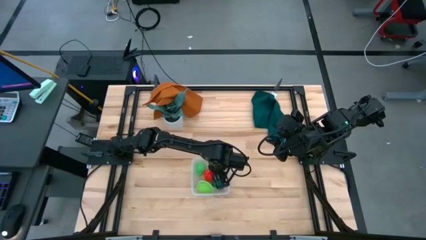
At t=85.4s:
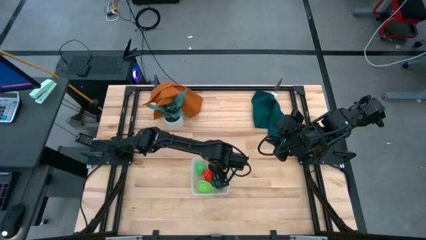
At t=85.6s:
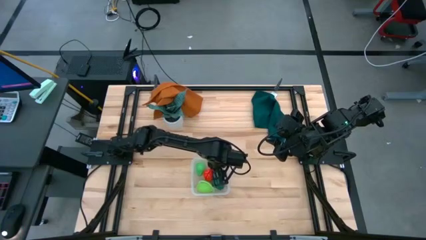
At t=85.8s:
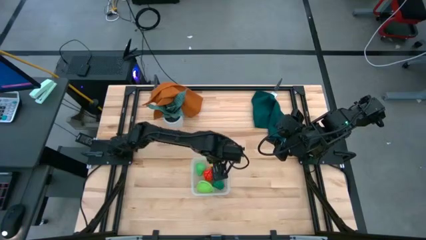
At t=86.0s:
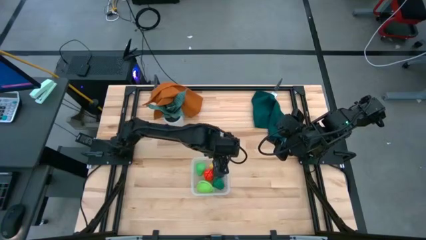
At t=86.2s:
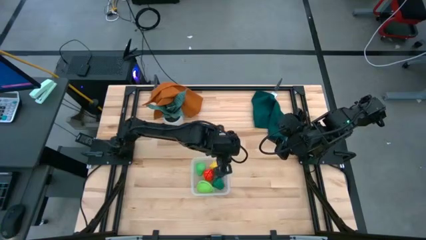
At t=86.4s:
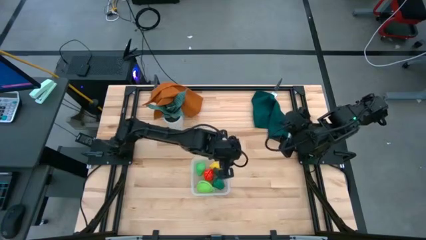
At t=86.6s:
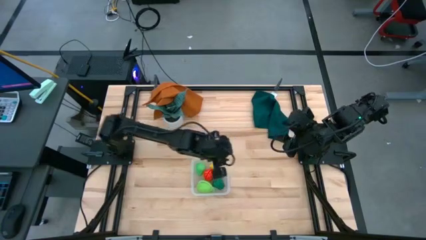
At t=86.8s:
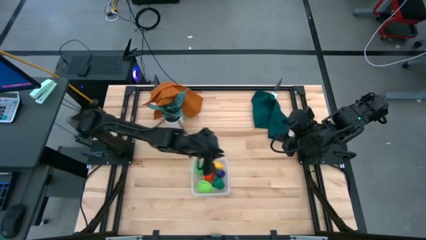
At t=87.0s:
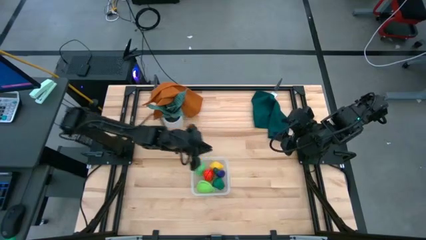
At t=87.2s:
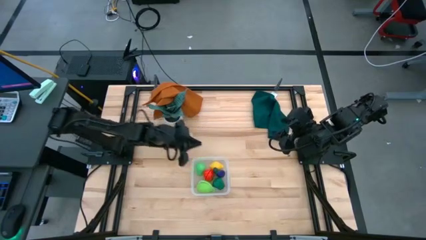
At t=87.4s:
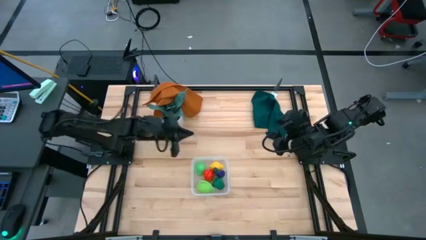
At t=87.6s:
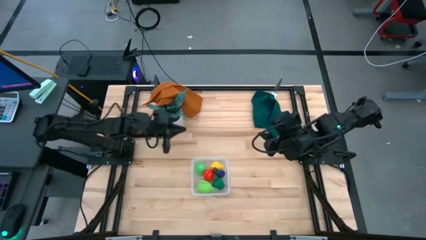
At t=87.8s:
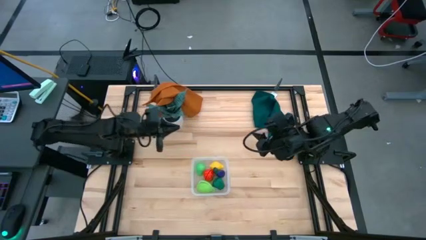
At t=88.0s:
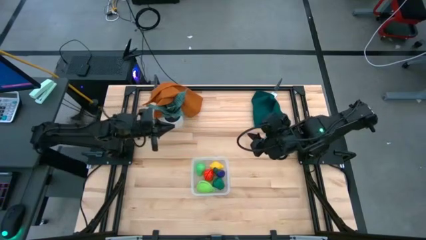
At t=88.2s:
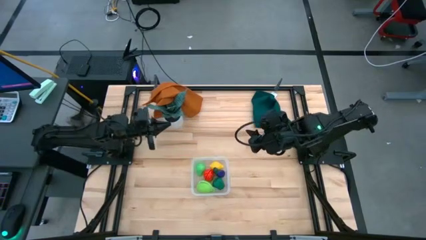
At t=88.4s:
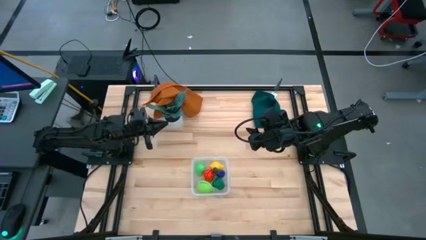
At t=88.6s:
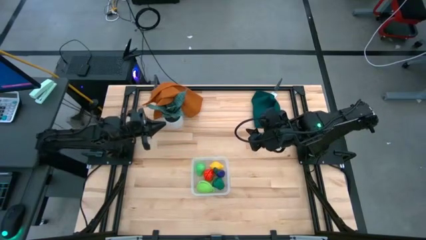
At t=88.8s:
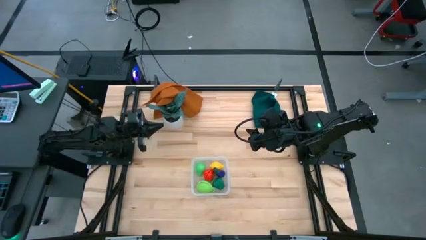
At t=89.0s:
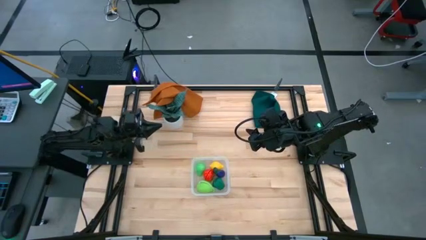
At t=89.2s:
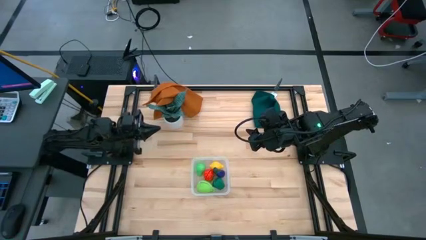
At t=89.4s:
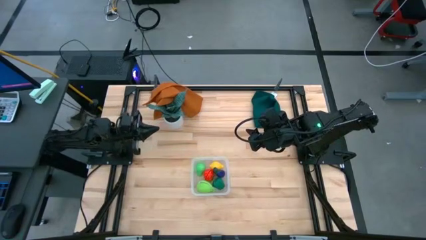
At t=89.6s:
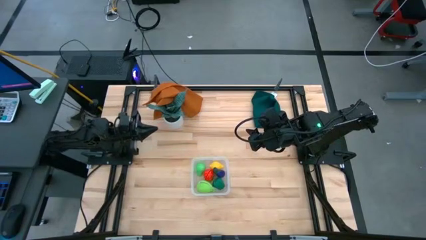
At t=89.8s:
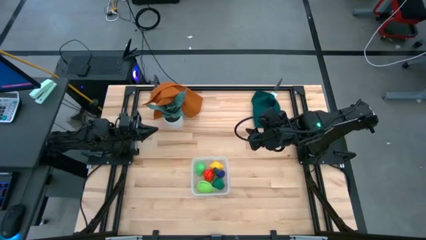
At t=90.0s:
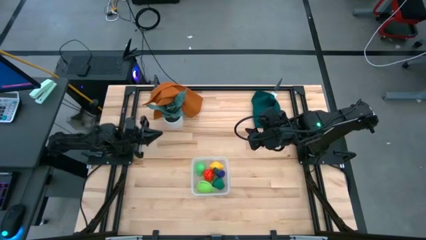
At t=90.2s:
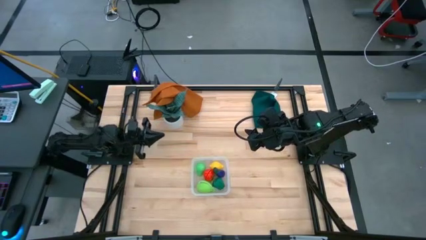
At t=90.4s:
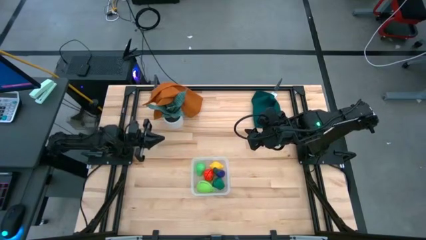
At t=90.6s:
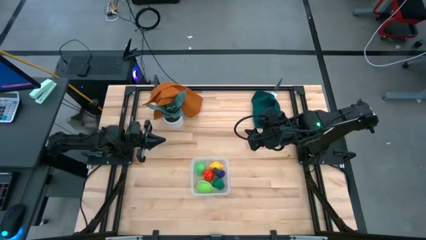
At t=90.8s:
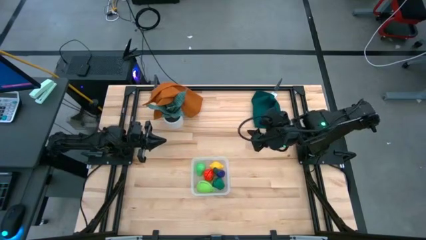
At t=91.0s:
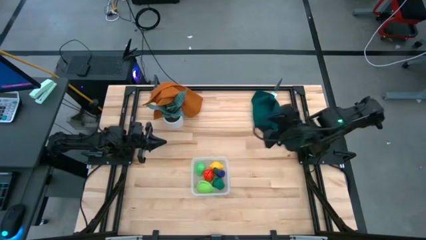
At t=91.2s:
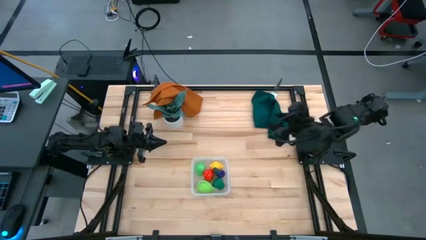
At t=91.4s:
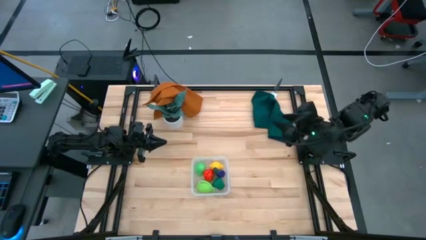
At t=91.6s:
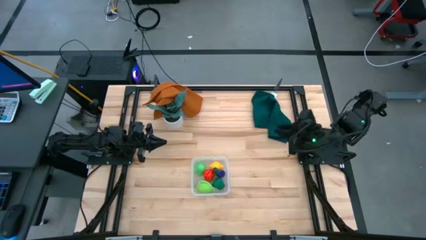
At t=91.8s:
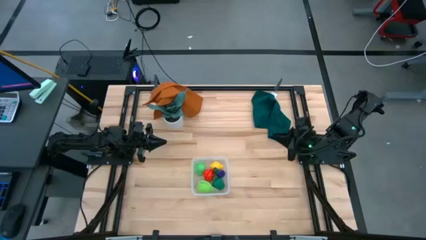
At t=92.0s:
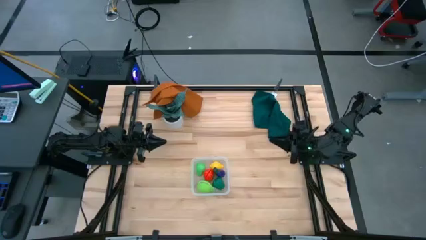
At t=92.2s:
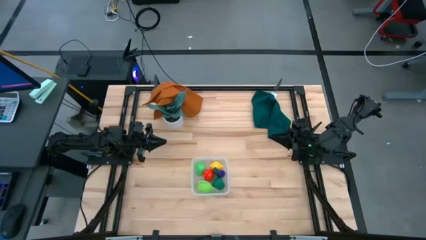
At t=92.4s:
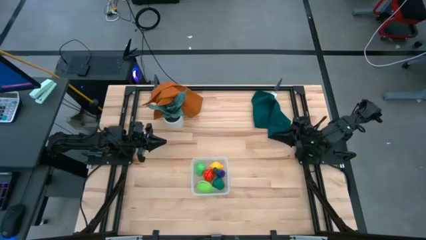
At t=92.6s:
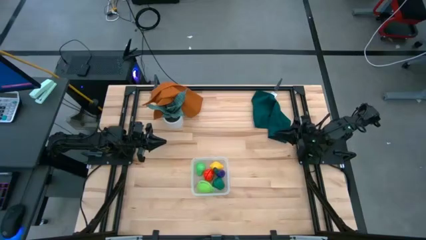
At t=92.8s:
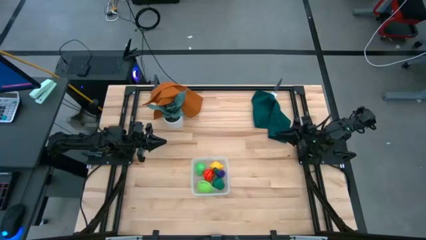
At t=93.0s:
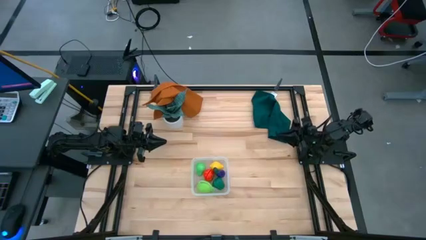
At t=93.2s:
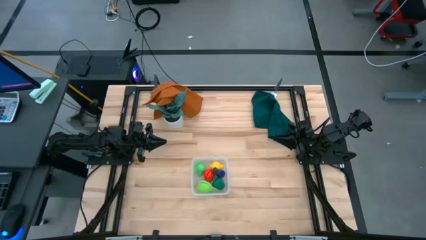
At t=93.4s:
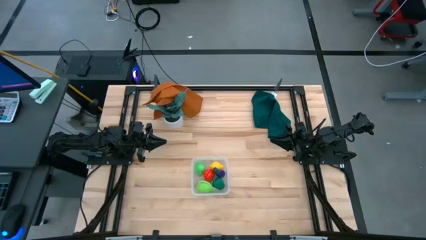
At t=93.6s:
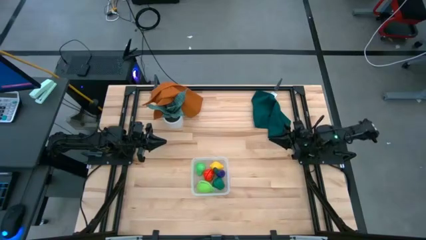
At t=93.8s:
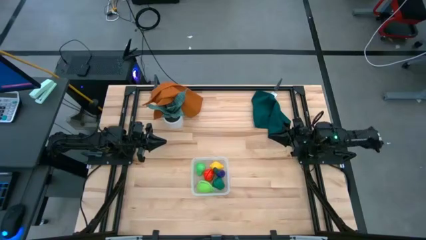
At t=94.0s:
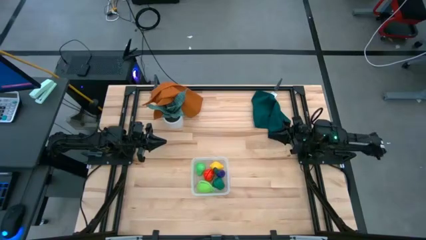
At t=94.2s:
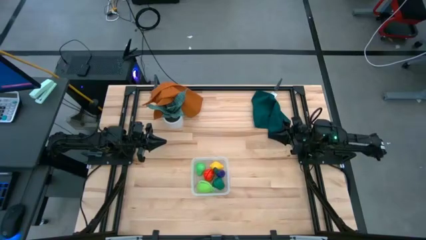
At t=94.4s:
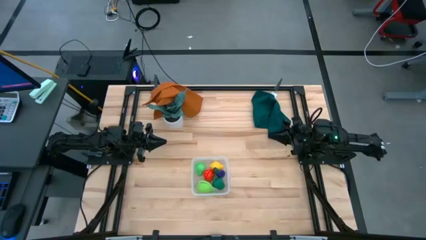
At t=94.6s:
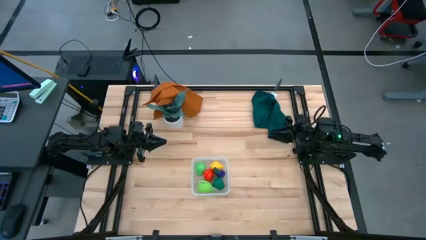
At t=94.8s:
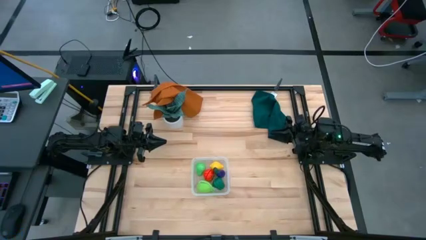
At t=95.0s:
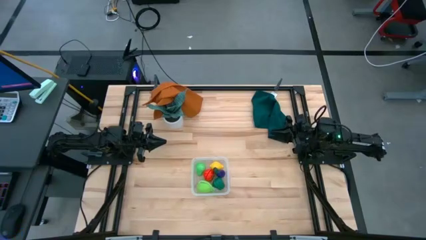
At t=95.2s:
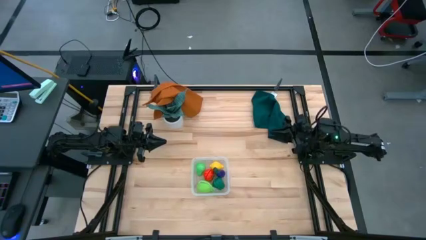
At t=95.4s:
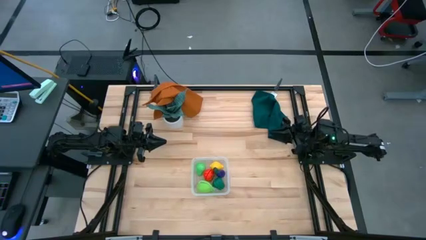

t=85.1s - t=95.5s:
Task: Pick and placing Produce into tupperware
Return to Home Position
